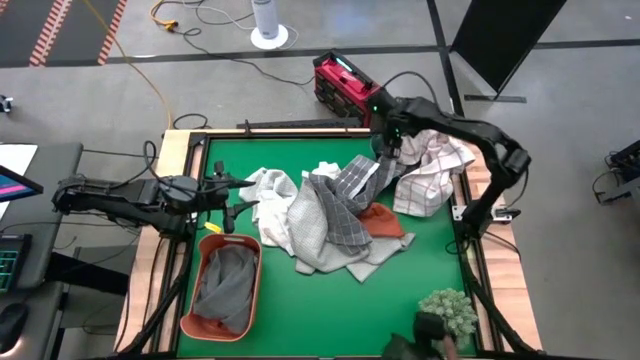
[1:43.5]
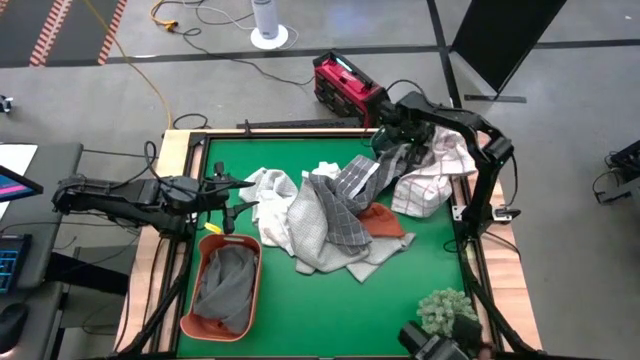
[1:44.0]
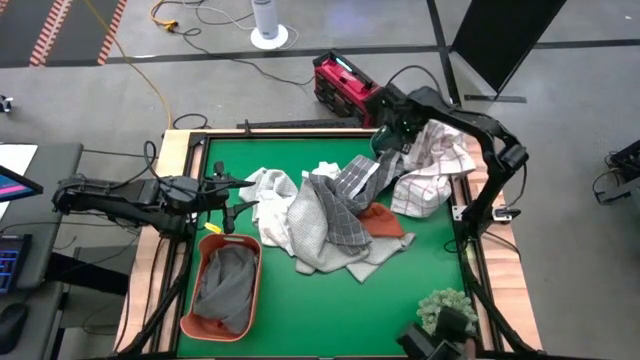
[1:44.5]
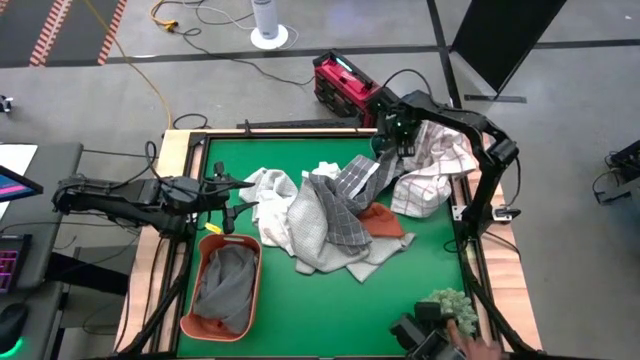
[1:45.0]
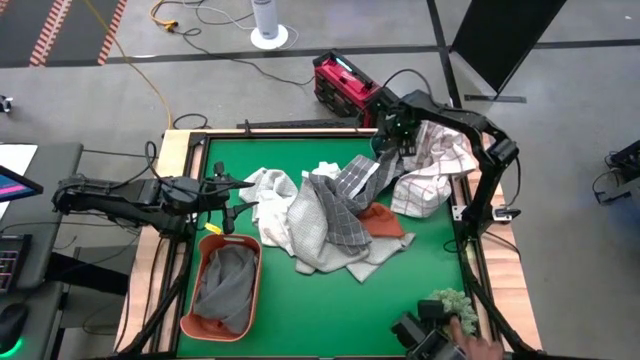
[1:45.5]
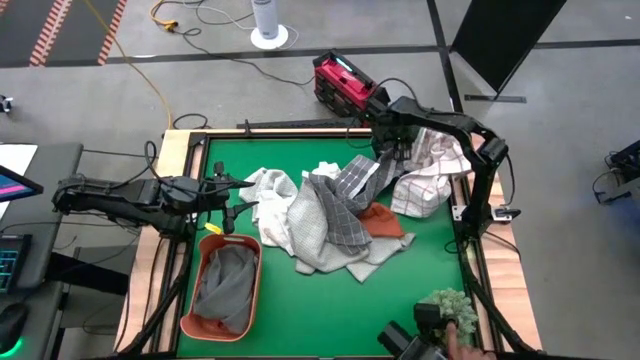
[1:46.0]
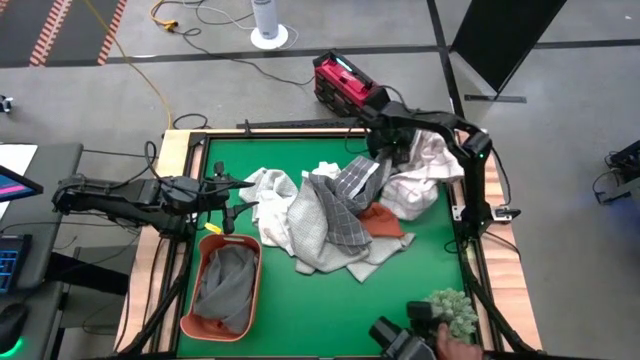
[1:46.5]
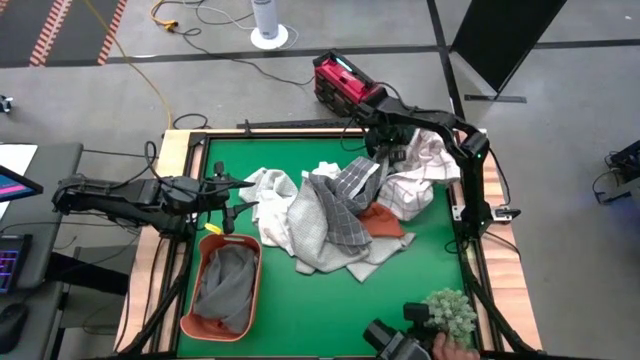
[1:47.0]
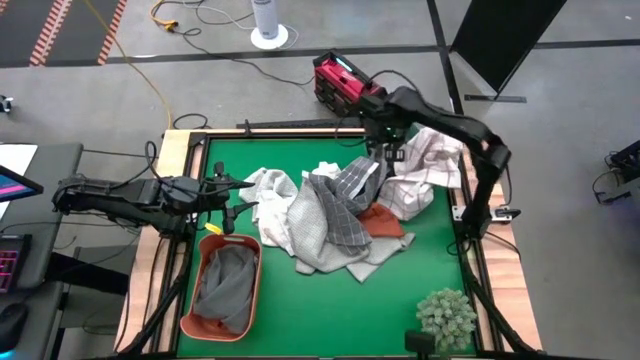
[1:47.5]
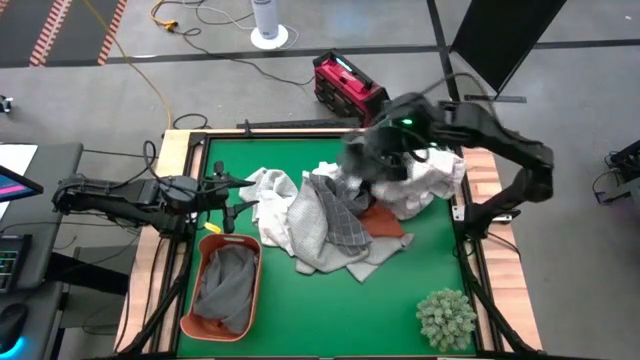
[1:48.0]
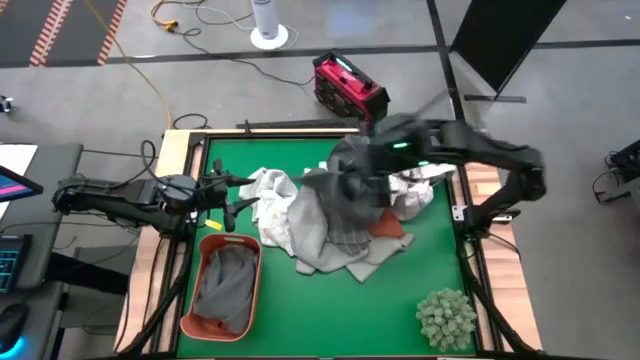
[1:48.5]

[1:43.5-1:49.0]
Task: Sort towels by color in basket
Remove the gray towel from the green bin

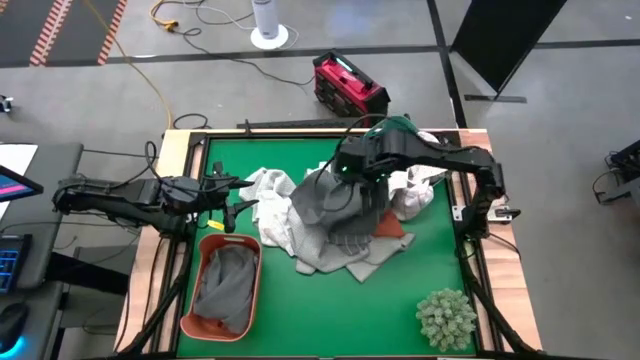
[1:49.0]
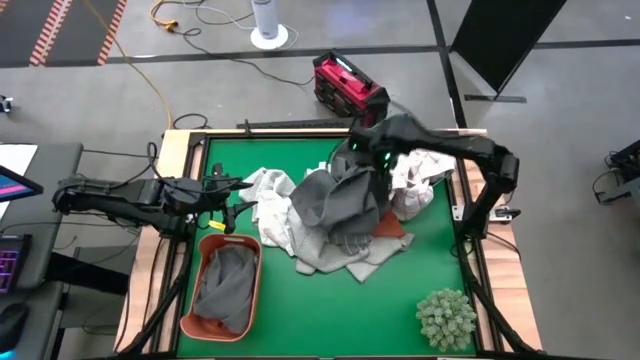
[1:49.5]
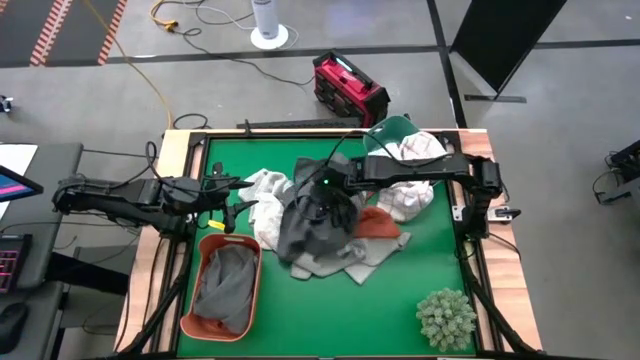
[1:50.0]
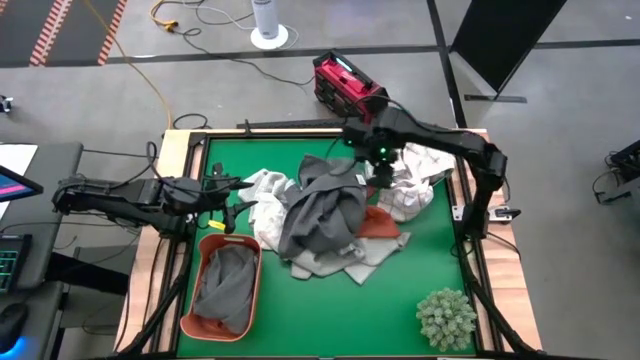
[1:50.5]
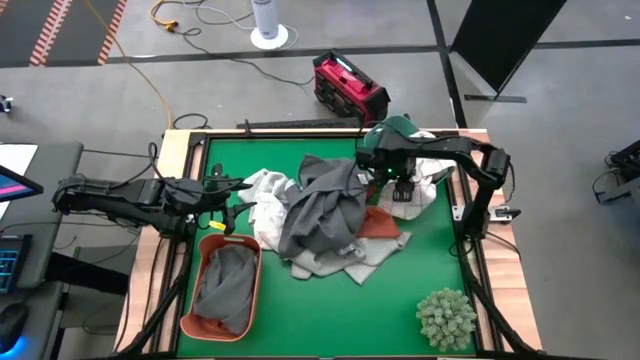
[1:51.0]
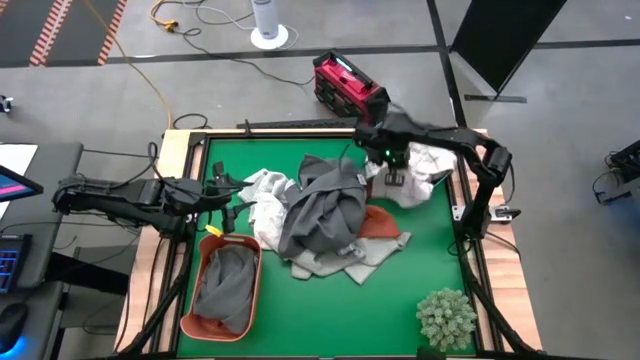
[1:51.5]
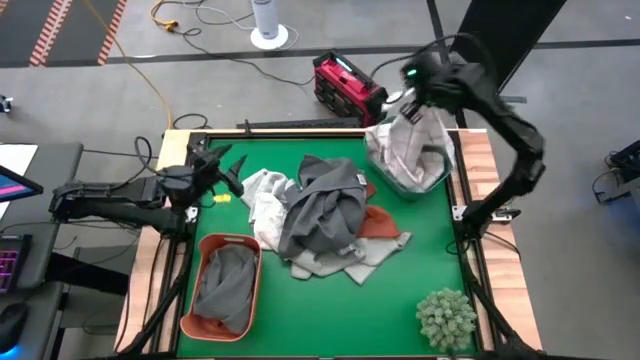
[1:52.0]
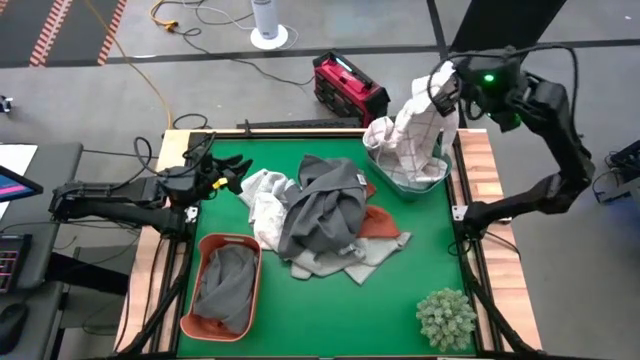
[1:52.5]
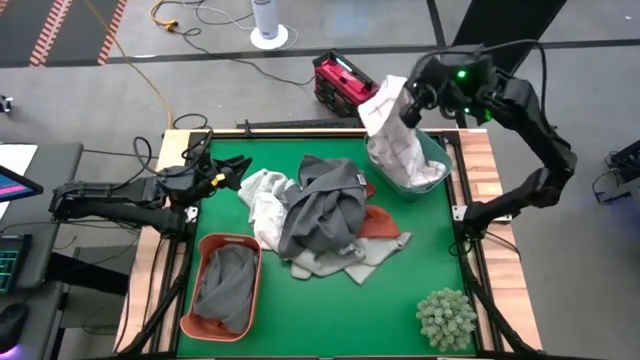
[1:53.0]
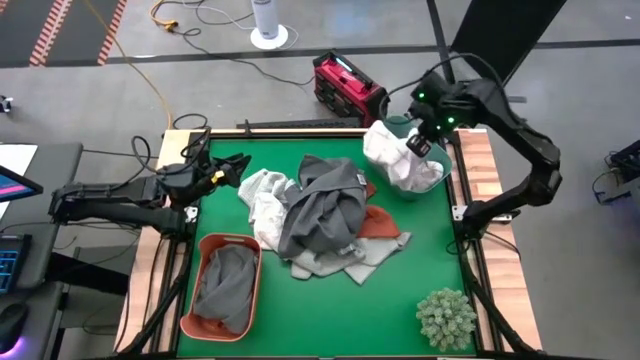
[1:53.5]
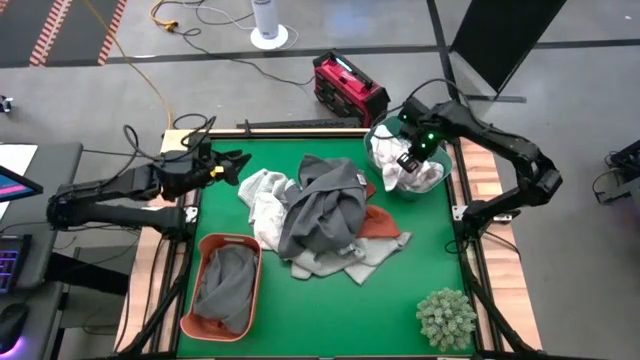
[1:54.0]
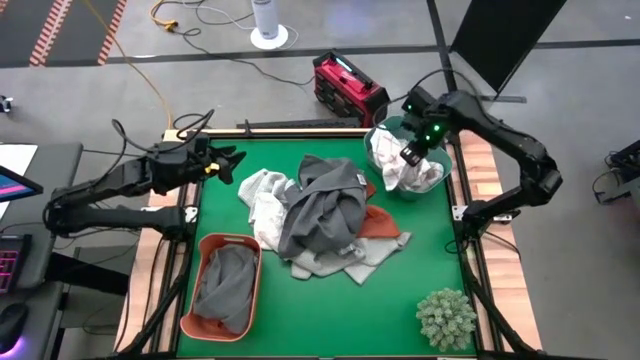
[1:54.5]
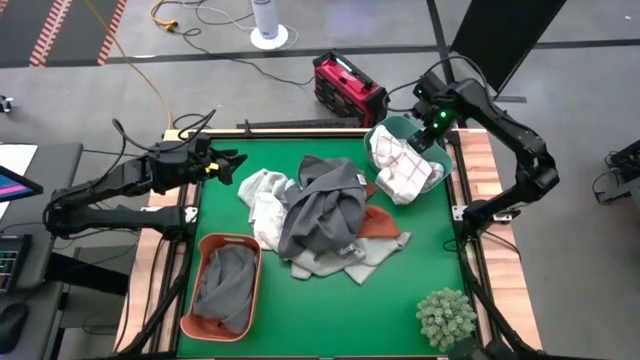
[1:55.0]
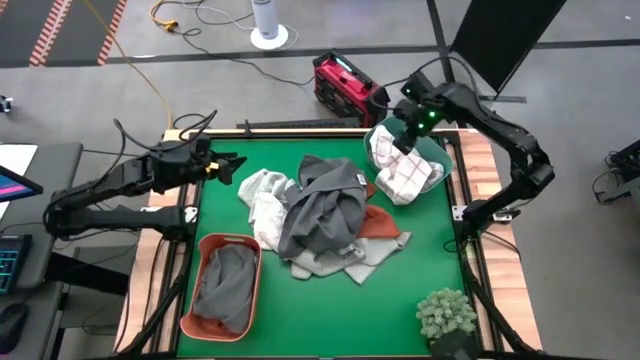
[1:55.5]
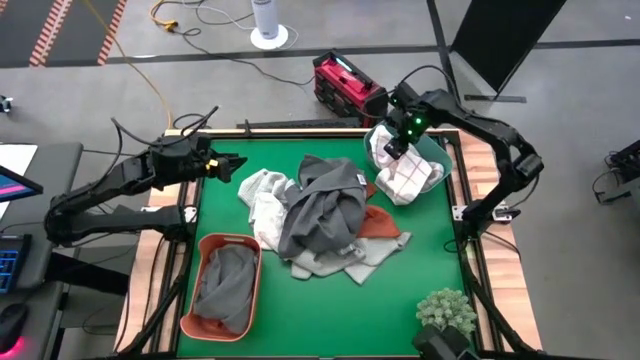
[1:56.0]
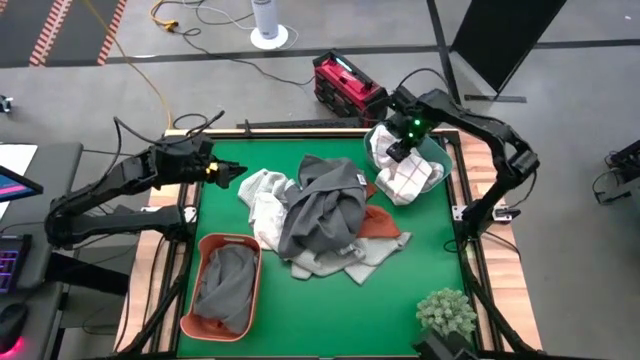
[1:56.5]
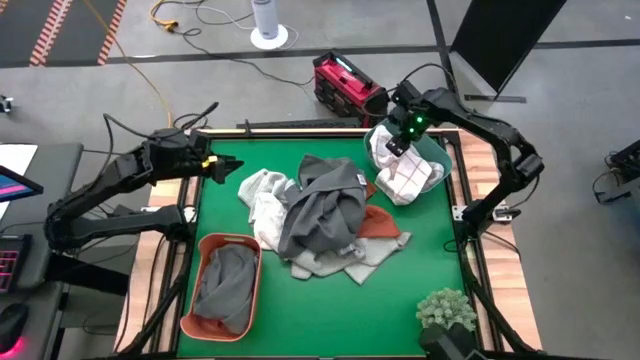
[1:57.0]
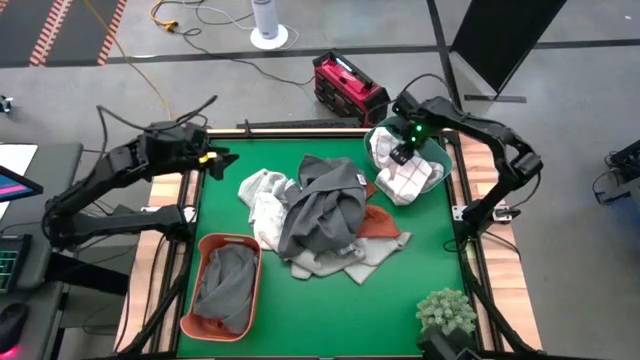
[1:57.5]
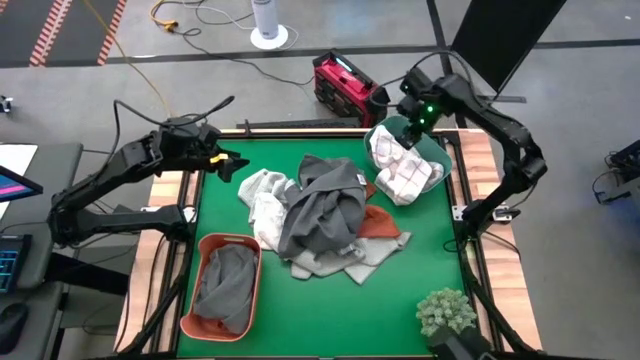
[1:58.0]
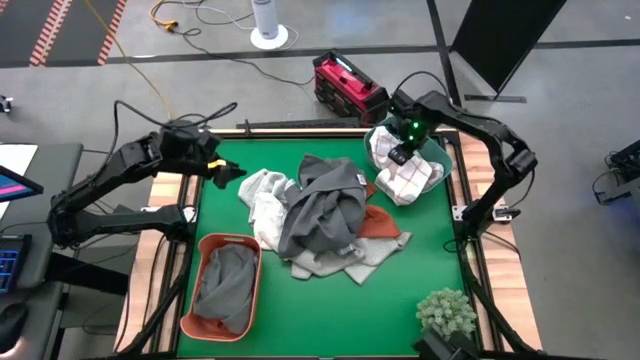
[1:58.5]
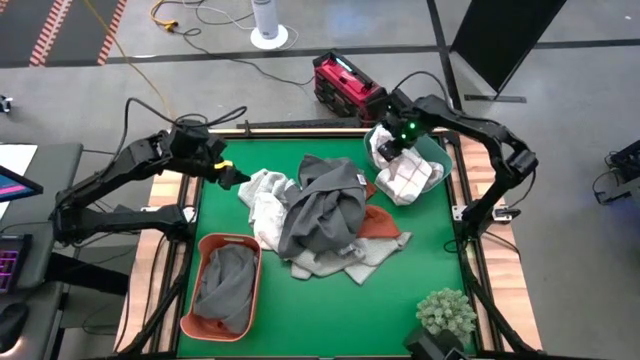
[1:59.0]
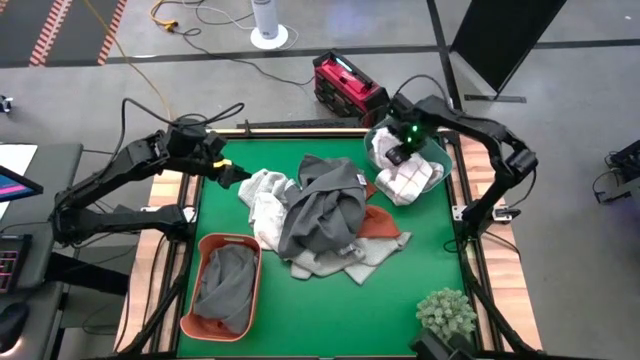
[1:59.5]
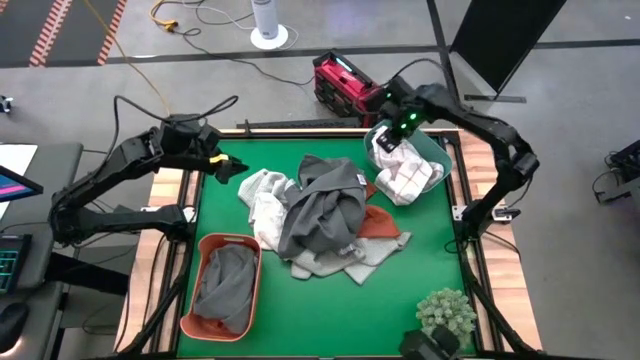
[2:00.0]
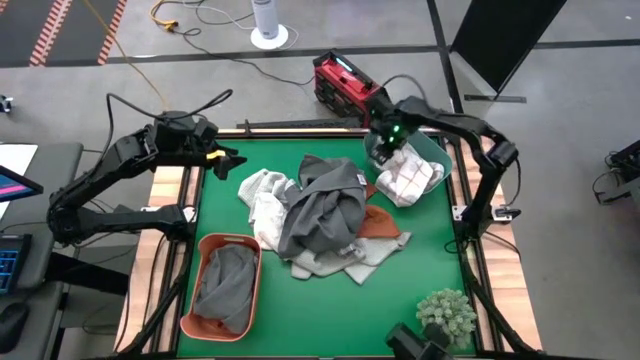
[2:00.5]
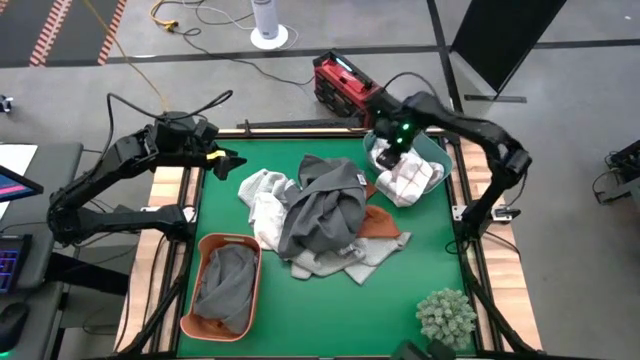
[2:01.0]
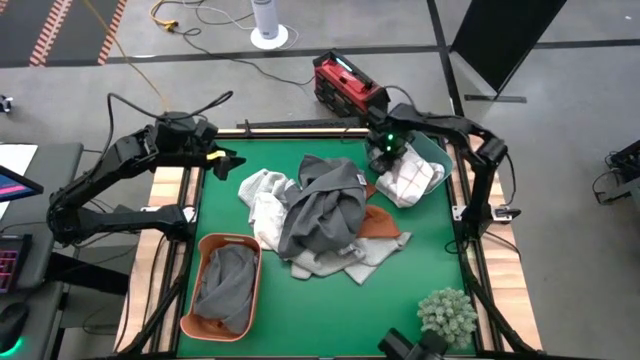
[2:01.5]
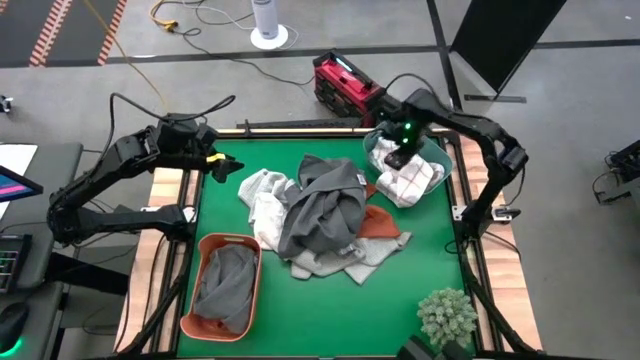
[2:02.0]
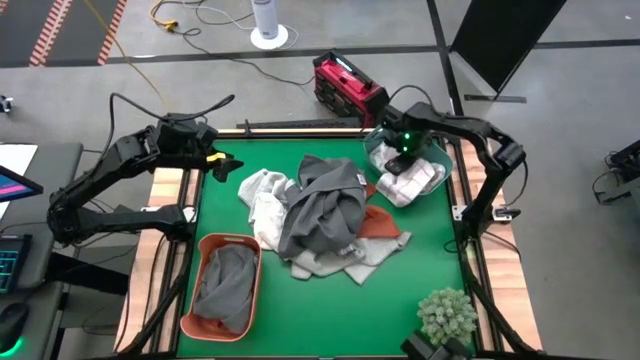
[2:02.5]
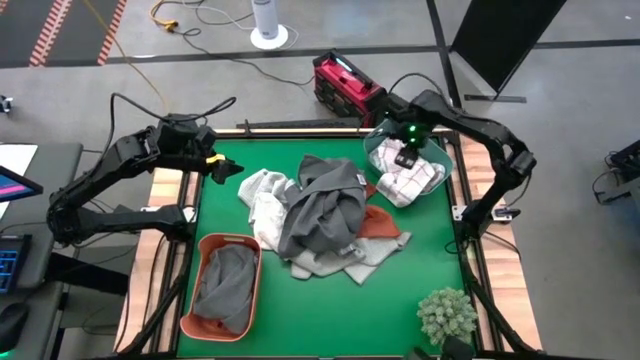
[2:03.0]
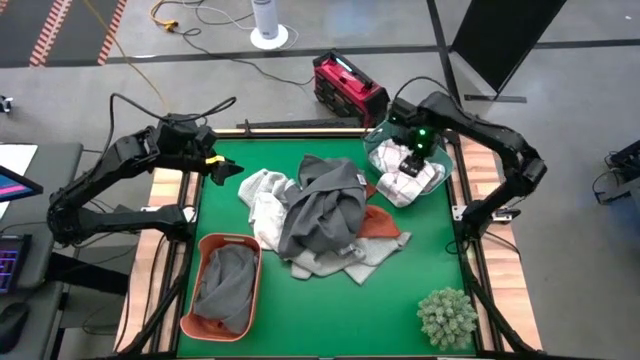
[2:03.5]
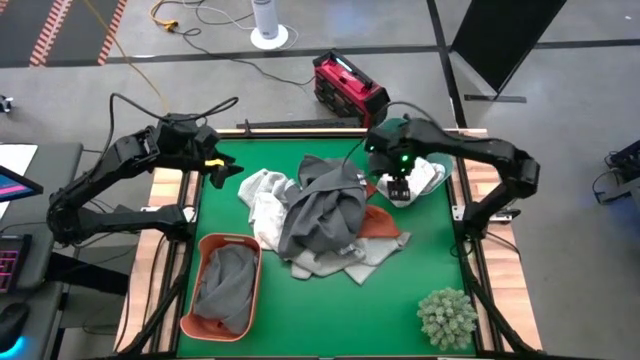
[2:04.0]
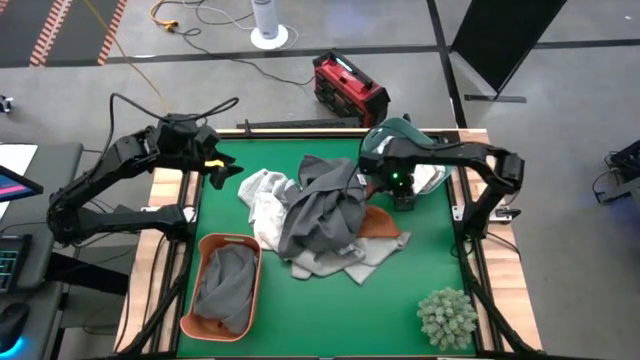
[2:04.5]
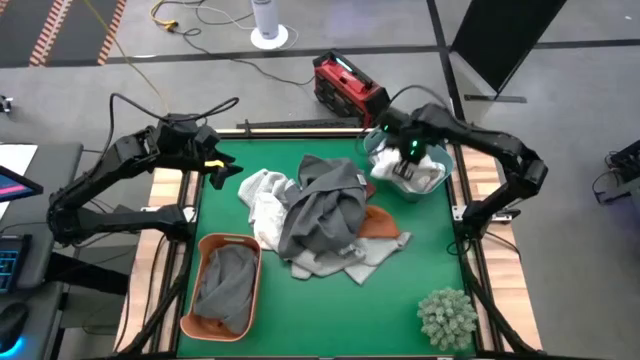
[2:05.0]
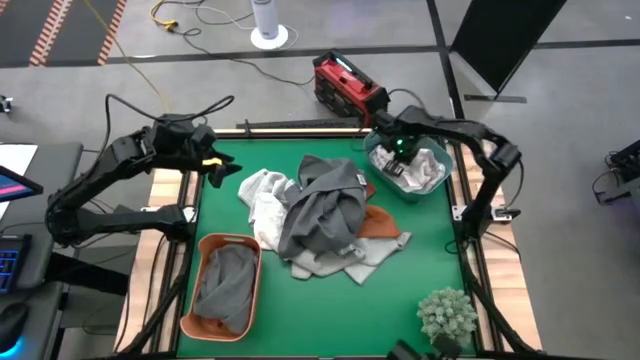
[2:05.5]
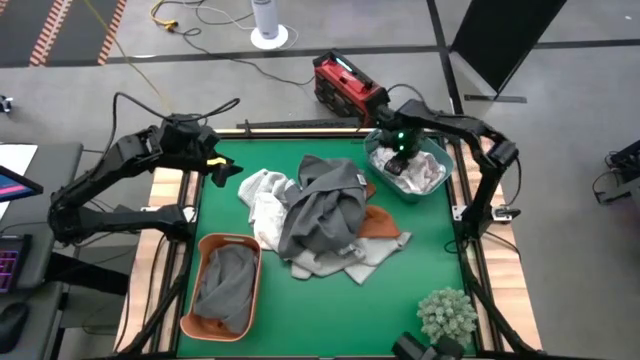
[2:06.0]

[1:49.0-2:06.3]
Adjust the white patterned towel in the green bin
